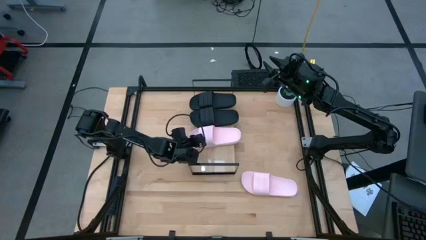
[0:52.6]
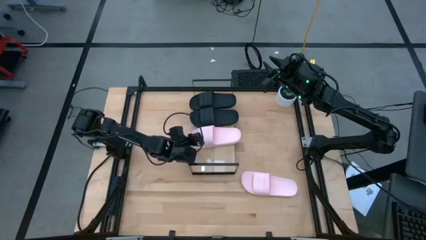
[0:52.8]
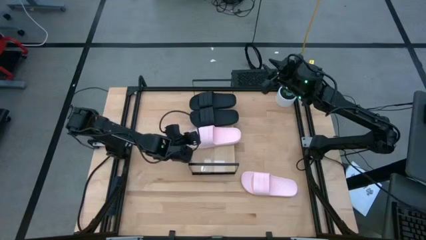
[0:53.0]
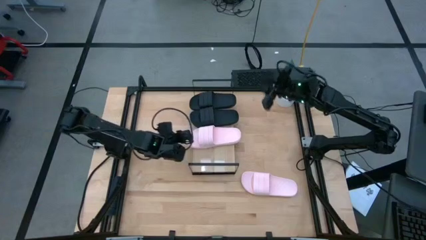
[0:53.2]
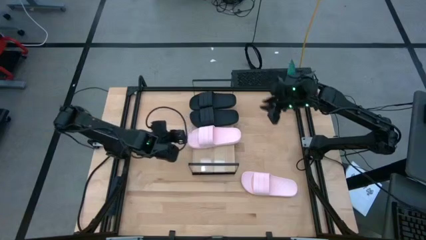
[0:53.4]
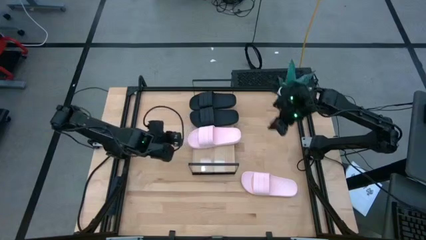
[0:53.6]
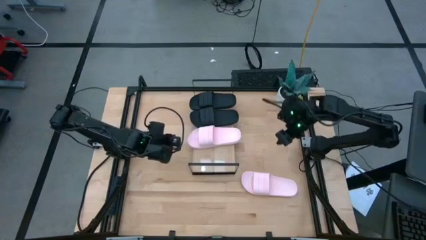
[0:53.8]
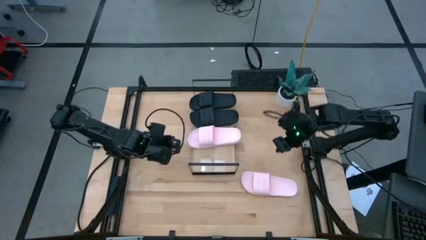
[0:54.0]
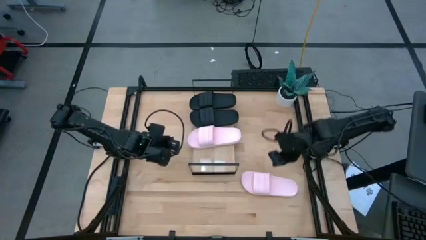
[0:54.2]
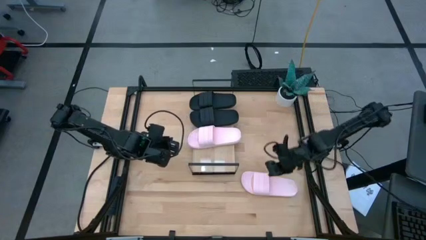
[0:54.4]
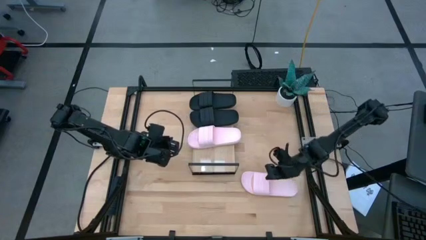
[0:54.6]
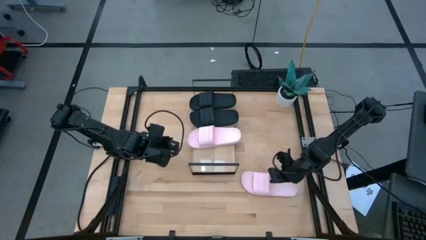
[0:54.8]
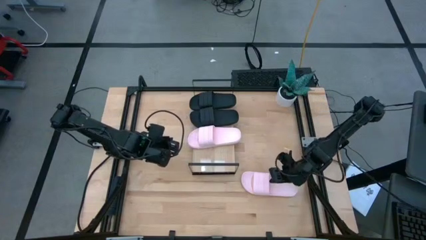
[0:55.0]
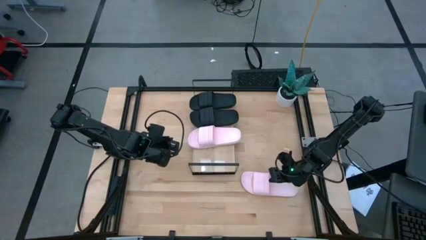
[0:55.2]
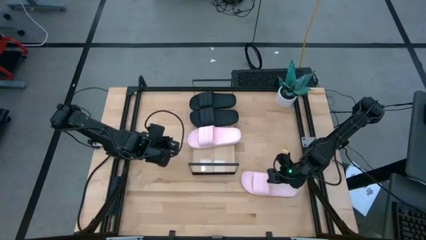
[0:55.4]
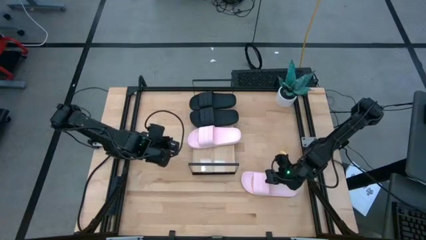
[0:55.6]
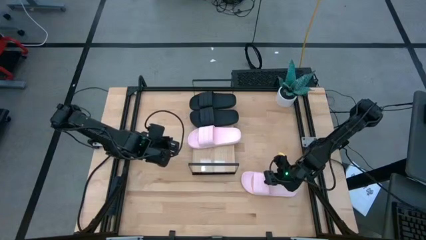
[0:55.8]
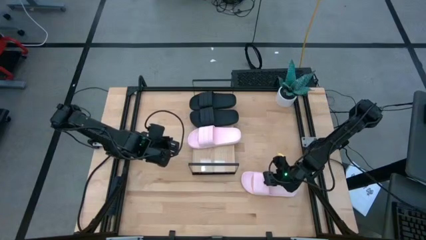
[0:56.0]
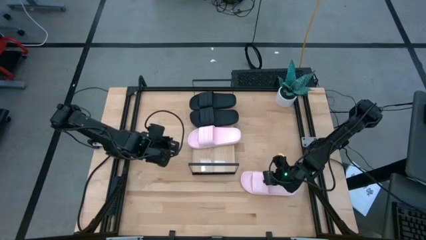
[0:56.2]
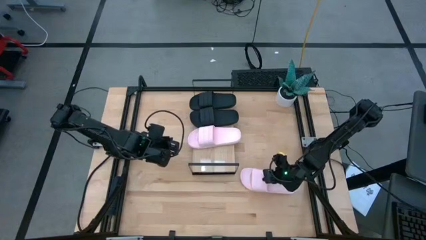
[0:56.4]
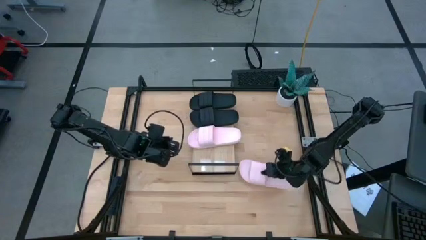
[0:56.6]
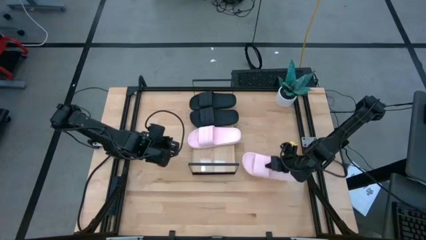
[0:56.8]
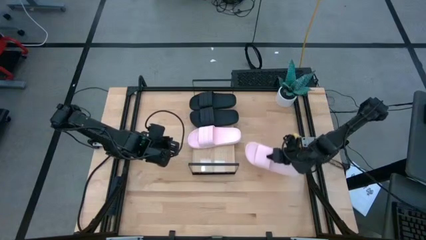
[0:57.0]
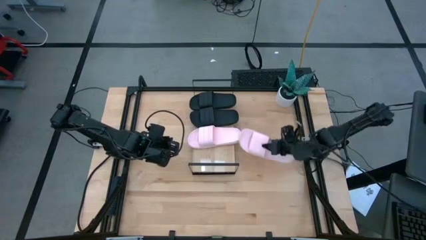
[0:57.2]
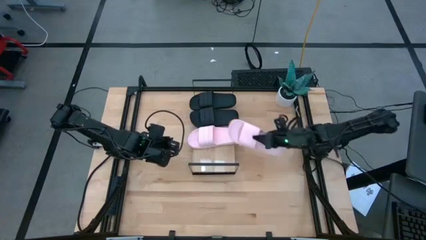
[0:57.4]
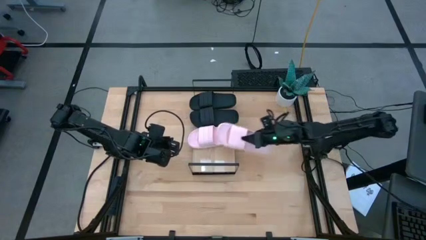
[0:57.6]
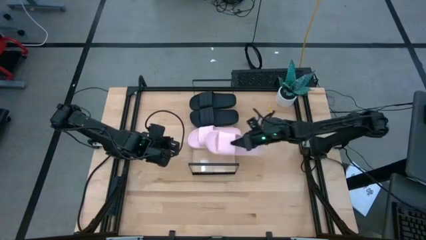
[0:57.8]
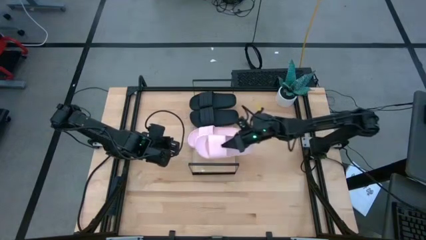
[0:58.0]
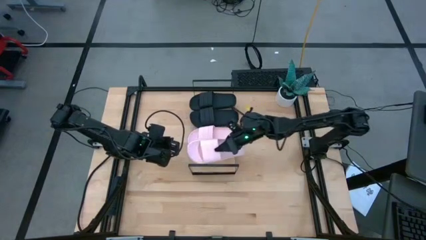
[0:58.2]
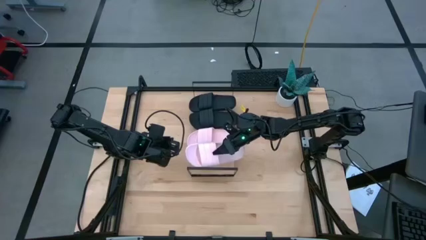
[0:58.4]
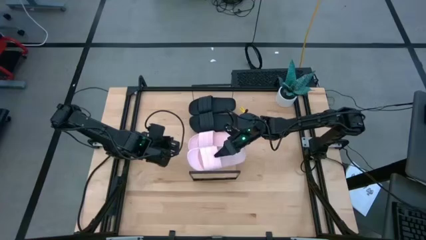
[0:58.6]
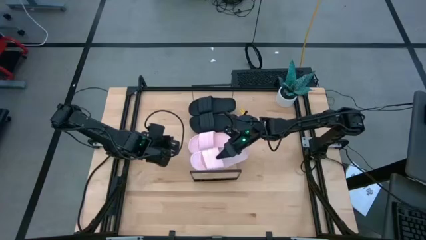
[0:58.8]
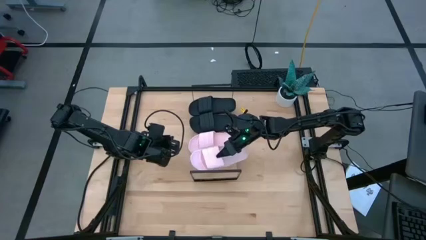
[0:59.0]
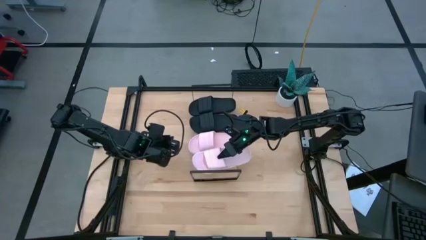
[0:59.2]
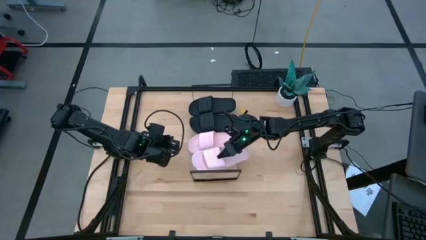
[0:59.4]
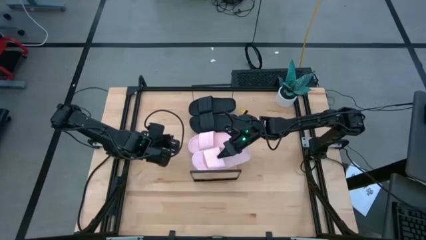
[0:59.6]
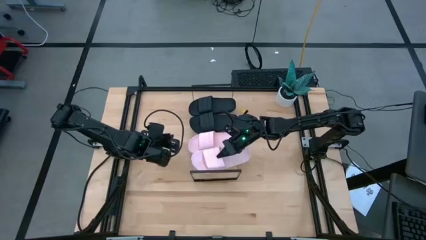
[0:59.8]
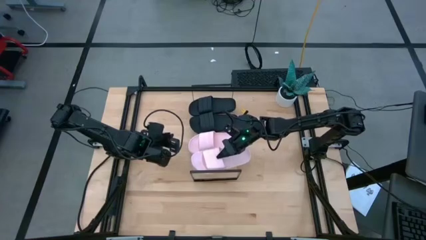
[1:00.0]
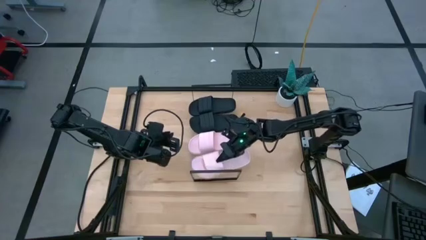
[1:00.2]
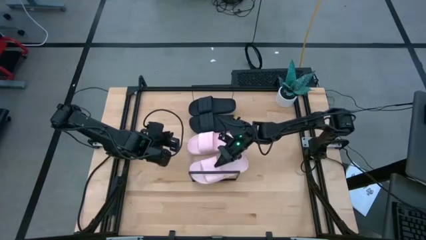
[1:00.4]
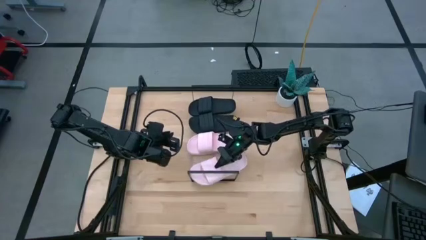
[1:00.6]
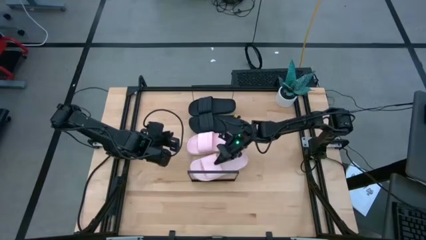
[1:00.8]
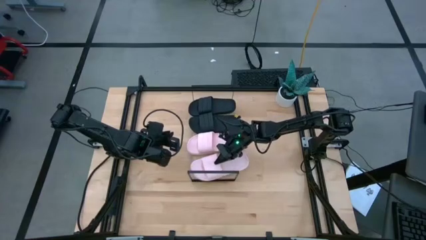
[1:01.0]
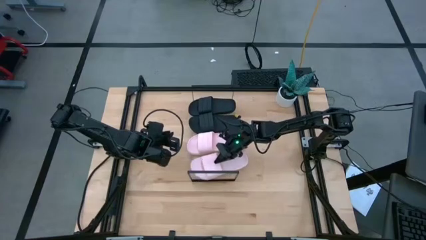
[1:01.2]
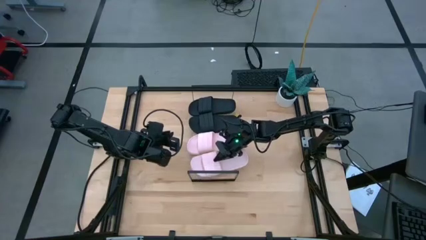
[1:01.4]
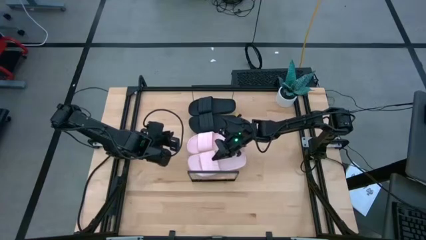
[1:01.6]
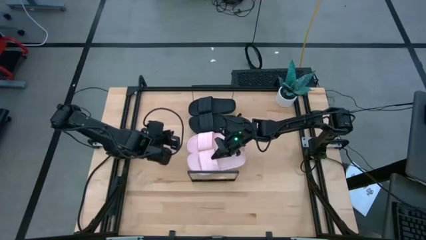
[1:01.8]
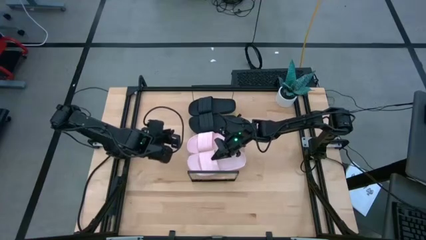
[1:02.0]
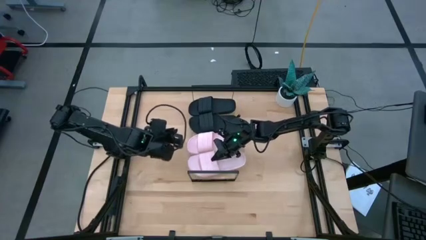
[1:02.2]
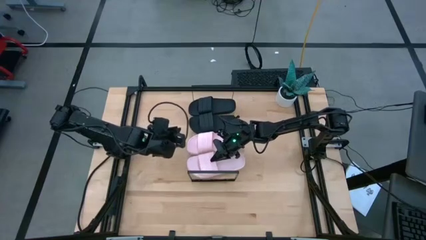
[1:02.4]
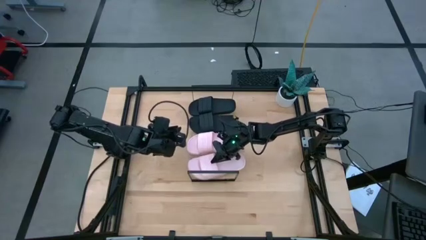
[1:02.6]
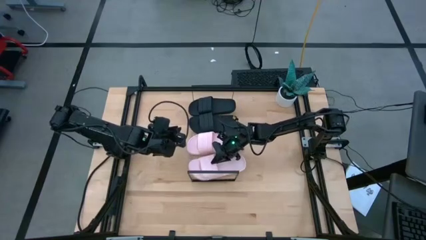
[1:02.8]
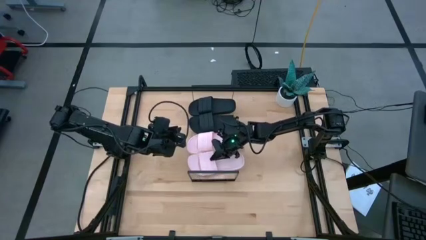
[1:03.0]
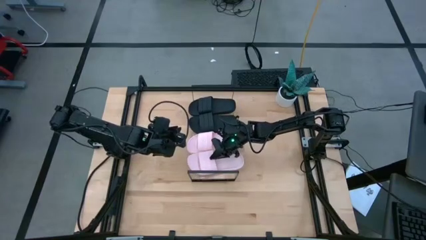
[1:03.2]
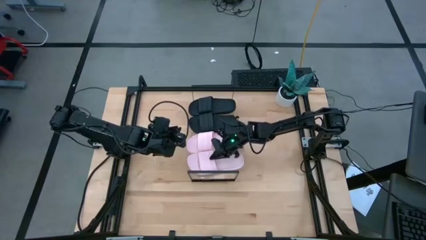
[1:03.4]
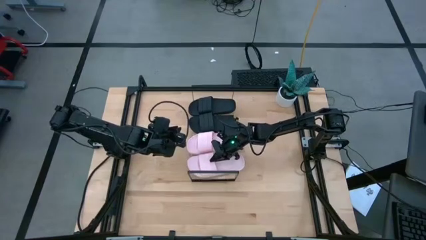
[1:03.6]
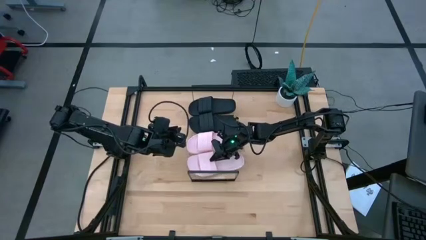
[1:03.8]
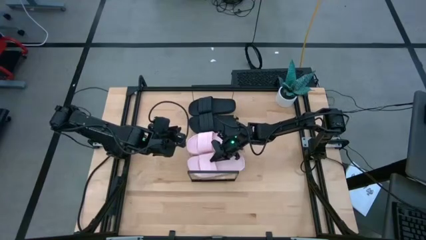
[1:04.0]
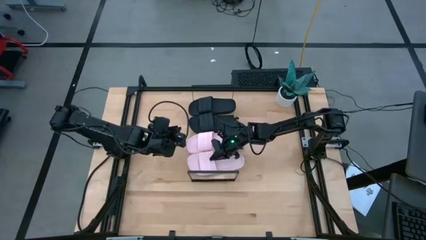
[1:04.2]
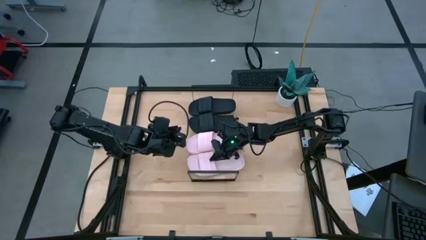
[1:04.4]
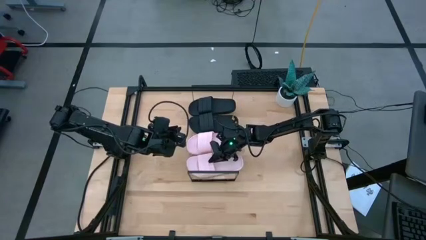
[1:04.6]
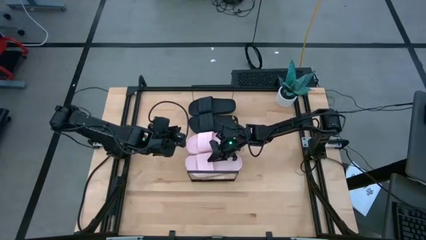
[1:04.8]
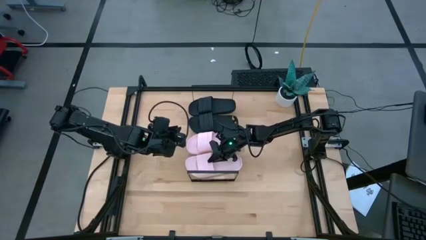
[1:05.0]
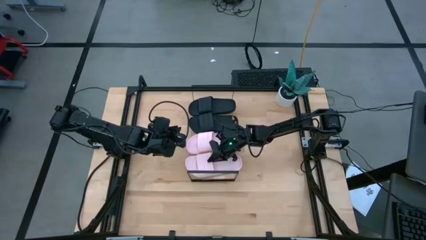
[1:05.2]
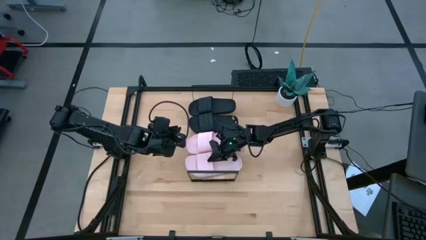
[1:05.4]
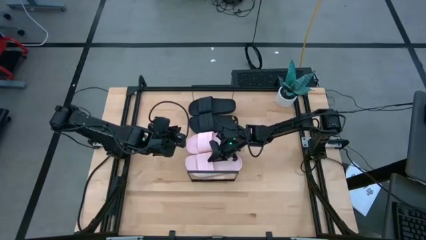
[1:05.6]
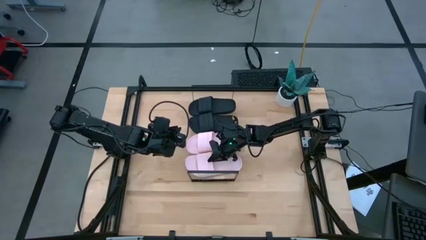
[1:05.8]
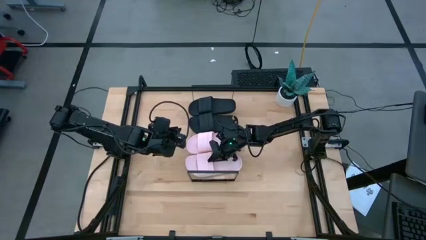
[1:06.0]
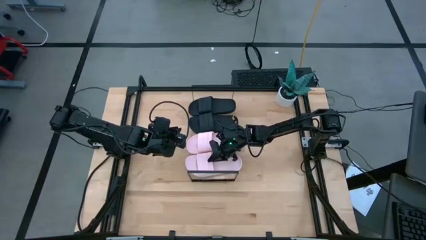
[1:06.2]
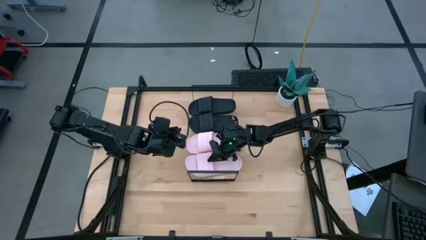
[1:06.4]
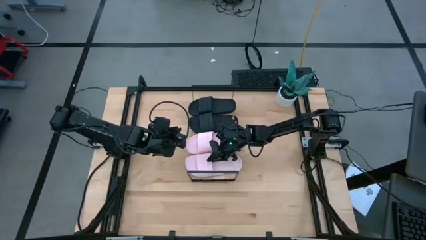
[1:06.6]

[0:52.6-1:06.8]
Task: Pick and place slides into the shelf
Put the pink slipper on the shelf
